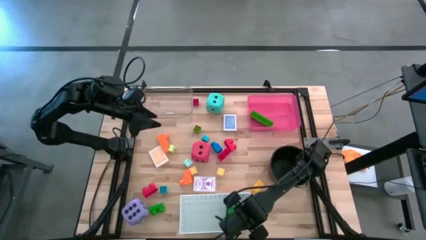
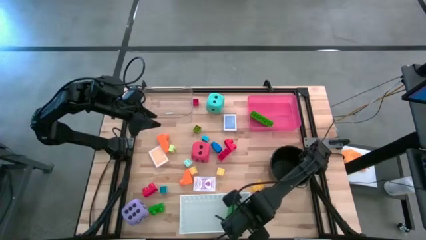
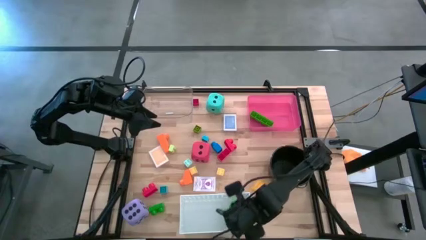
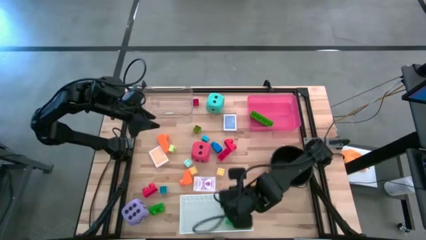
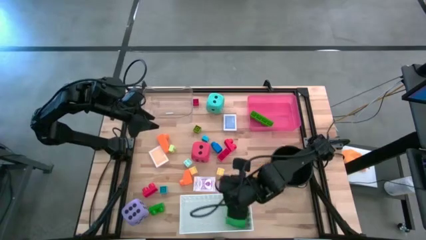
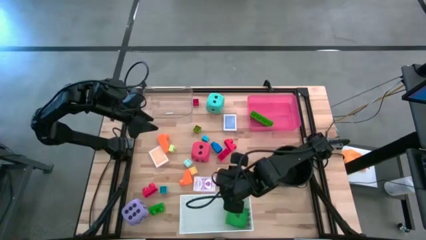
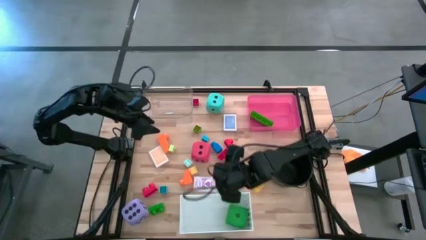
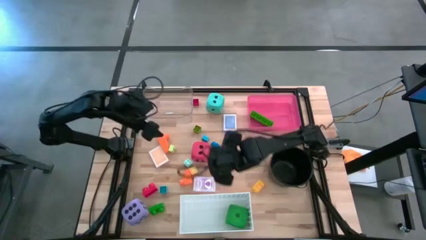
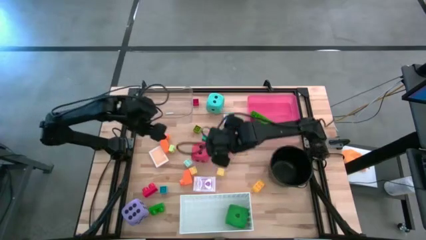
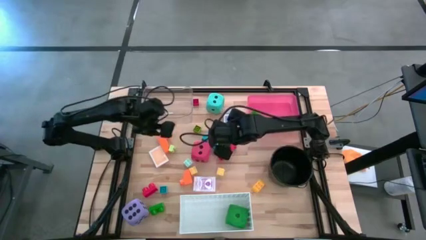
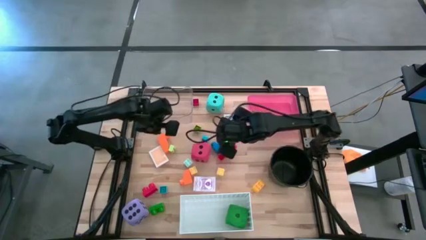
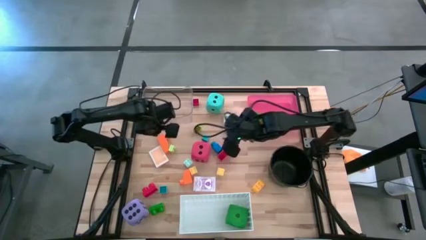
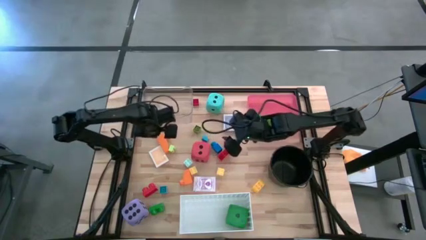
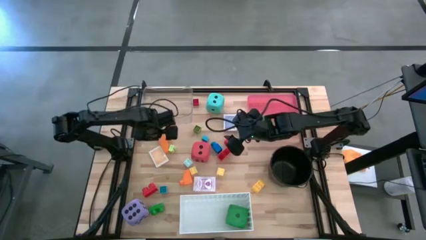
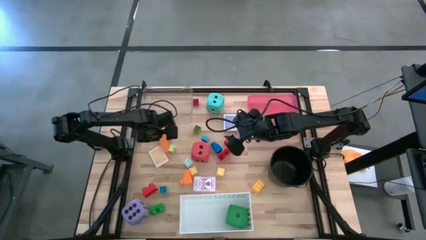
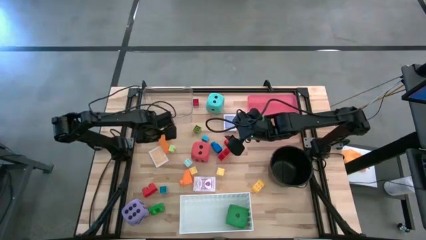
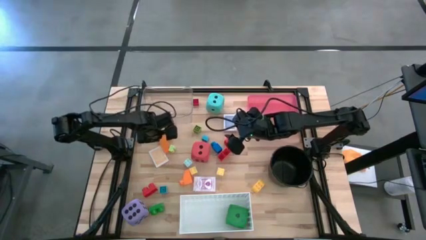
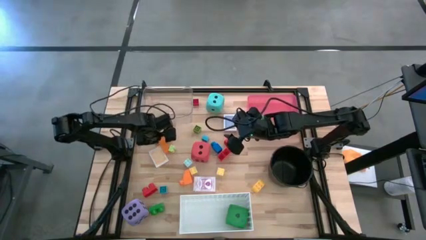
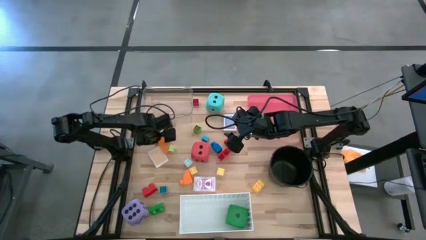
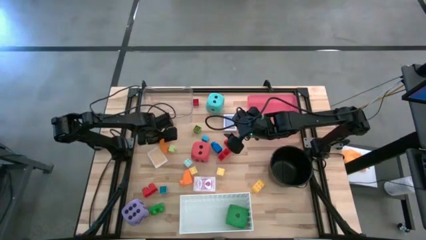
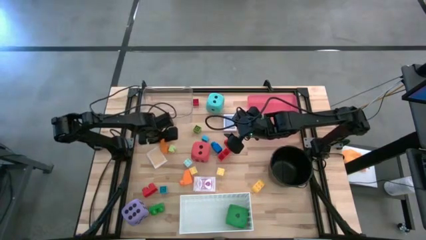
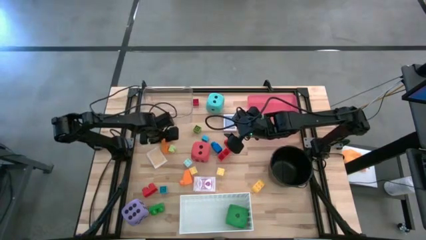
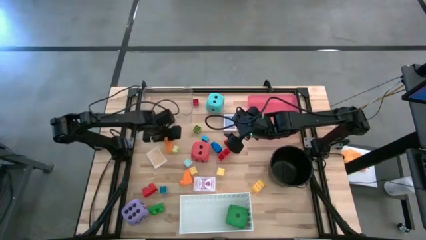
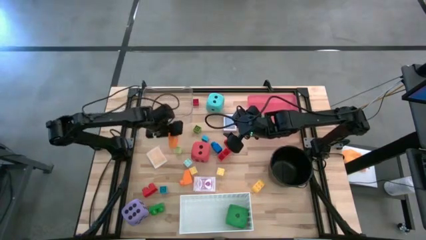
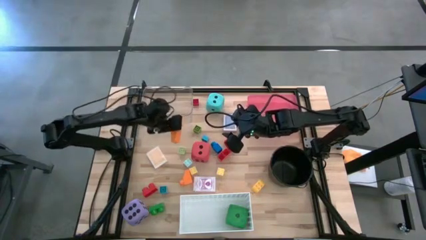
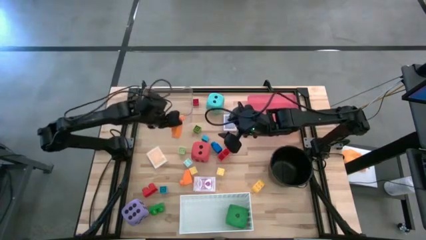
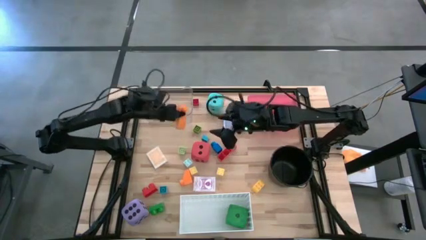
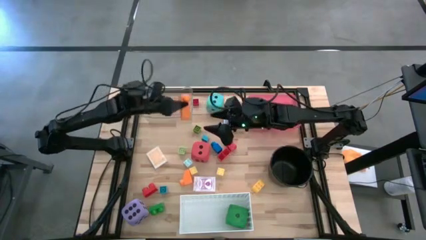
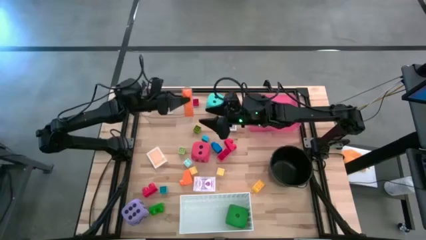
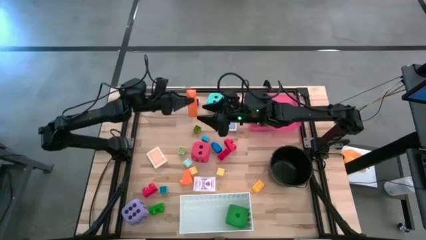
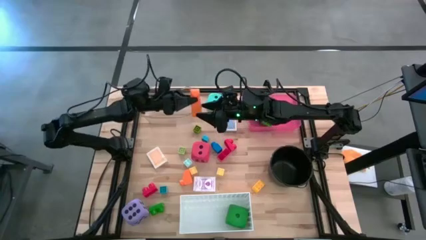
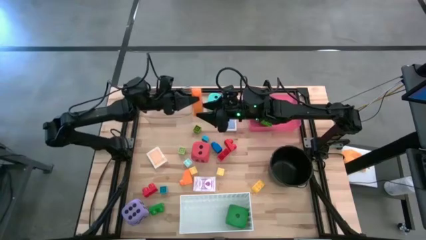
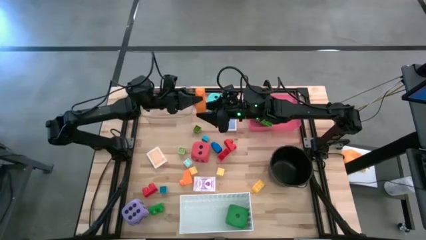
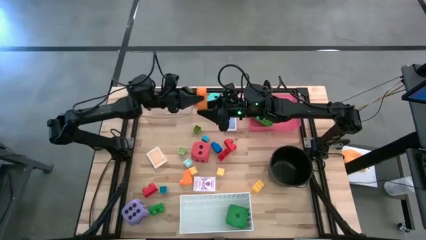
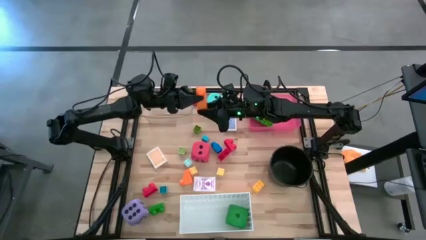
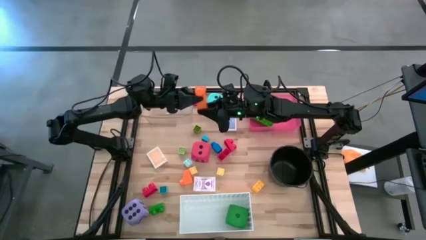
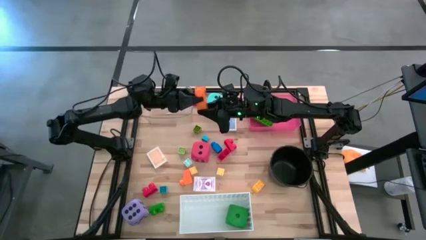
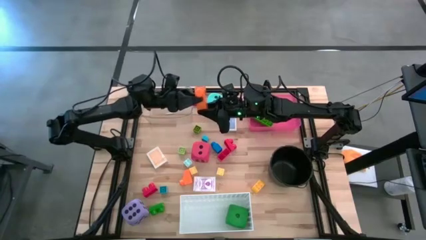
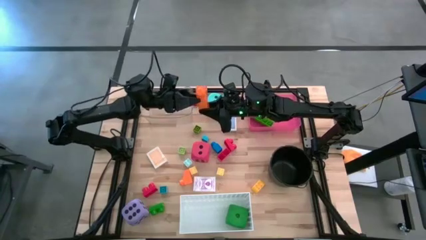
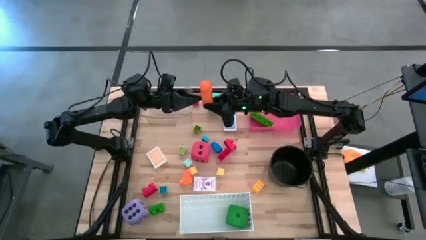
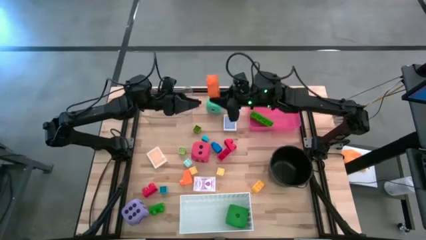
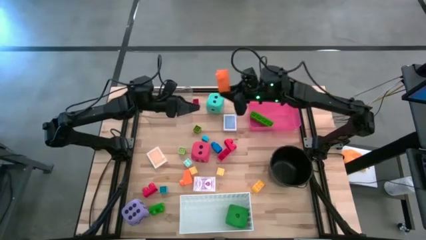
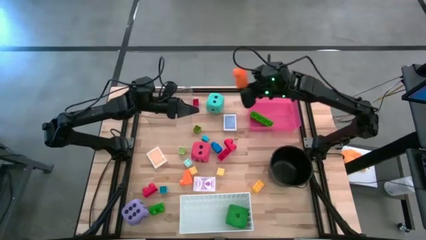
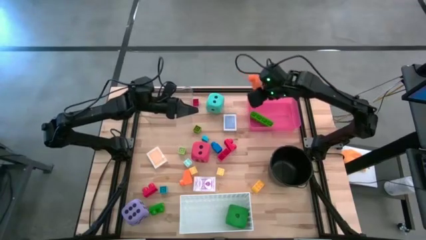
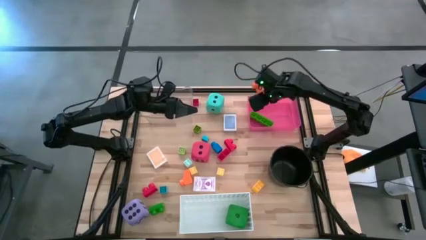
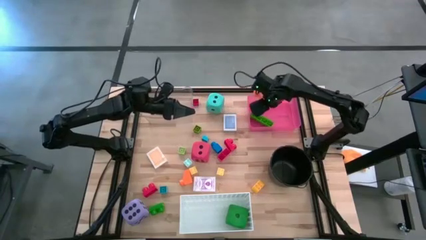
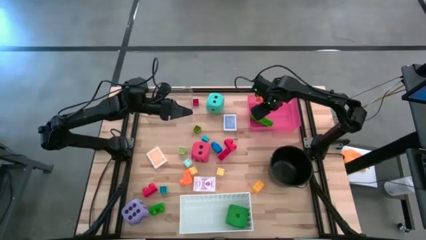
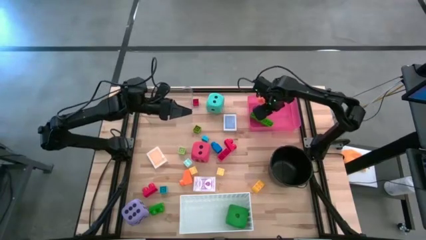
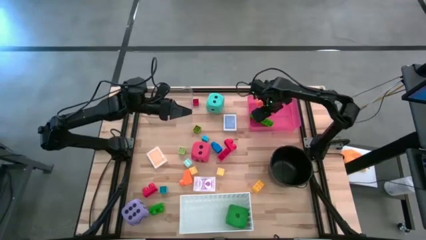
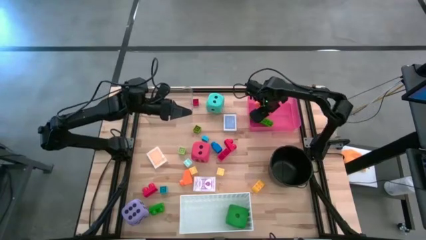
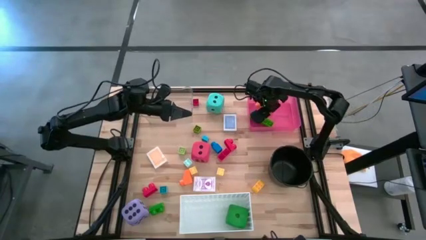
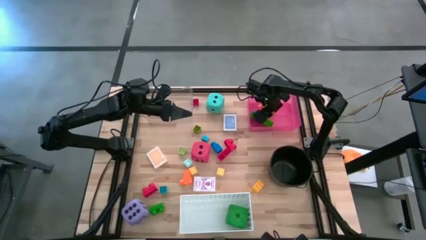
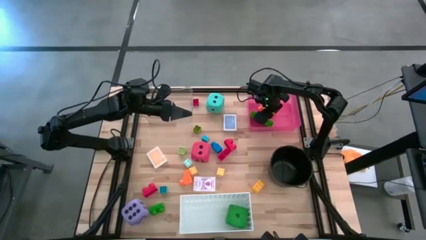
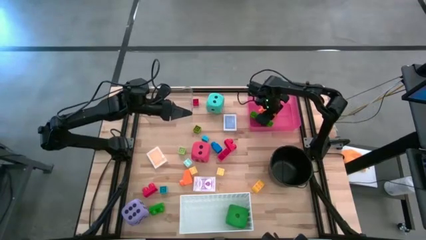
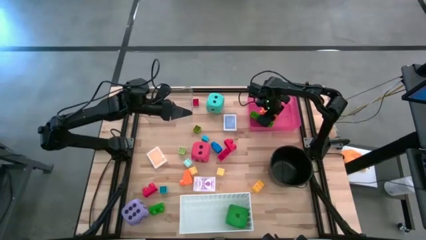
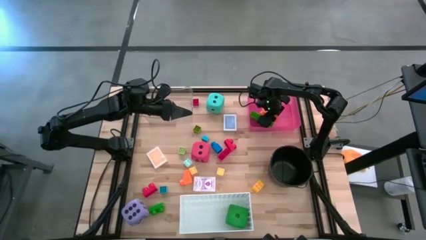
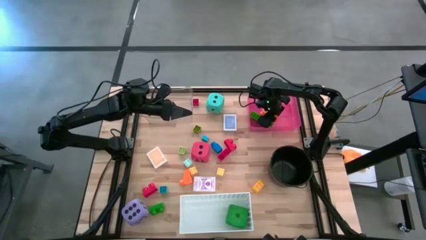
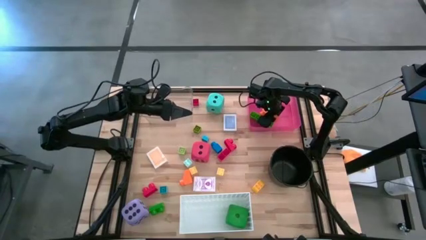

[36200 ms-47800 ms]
Task: Pick & Place Toys
Put the orange game piece into the red bin

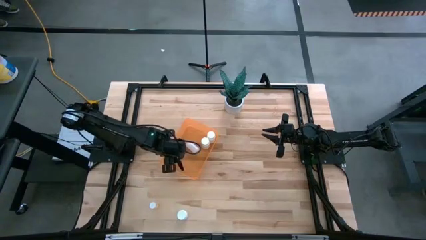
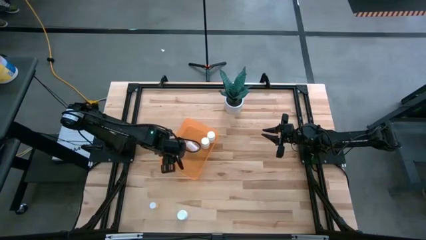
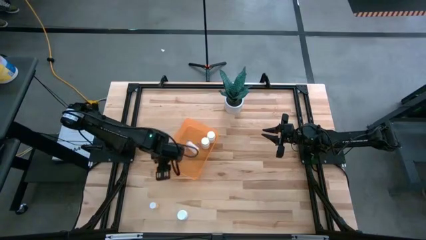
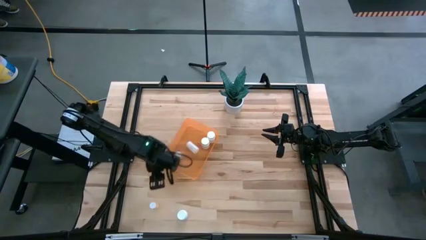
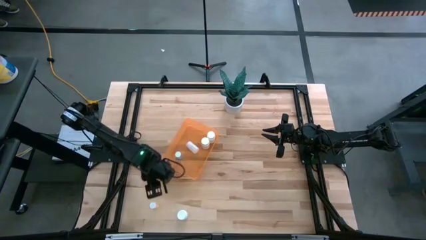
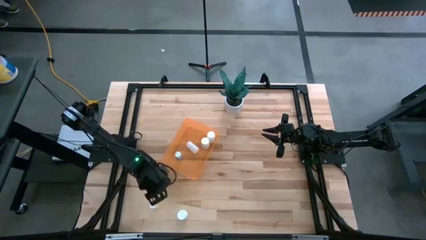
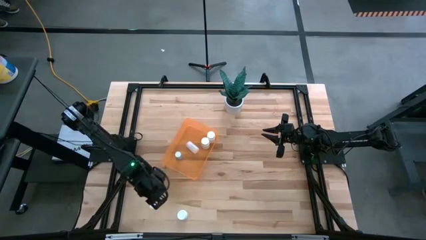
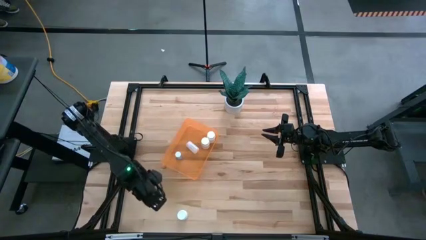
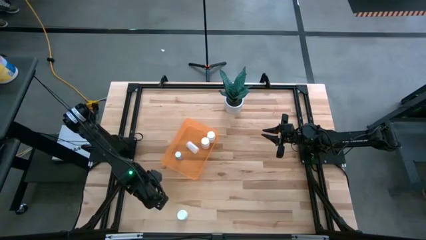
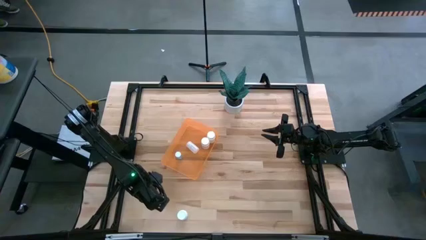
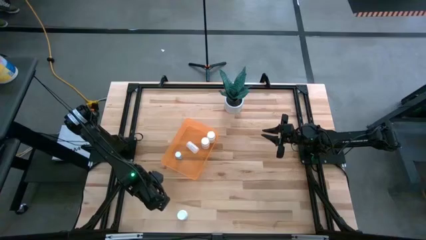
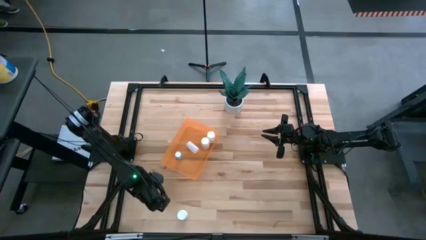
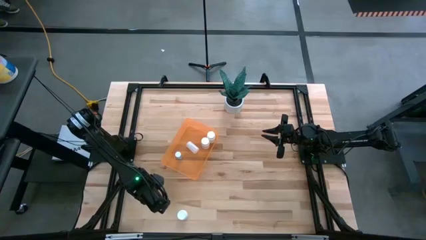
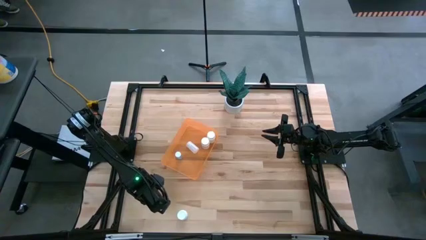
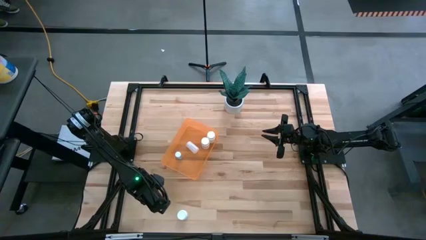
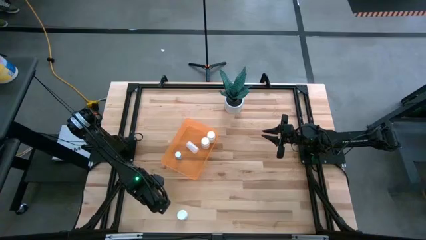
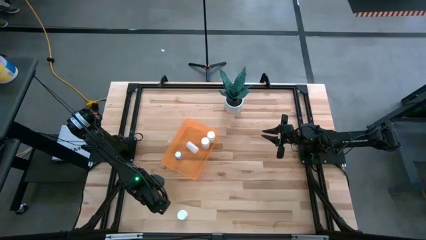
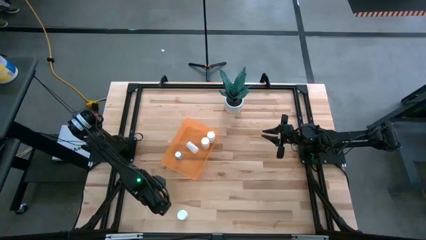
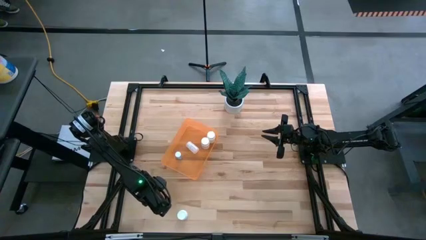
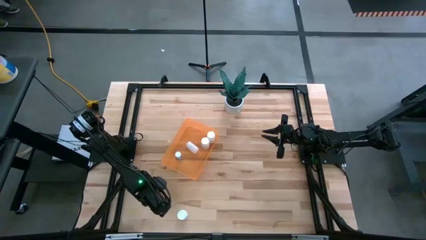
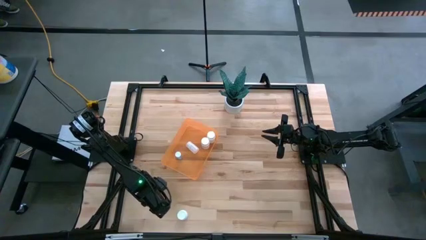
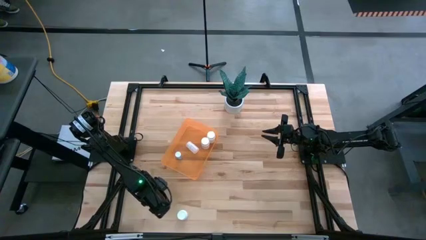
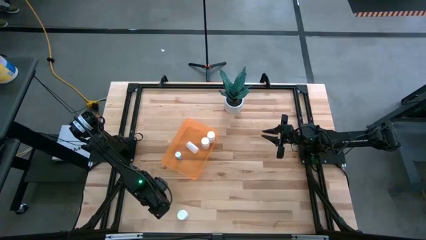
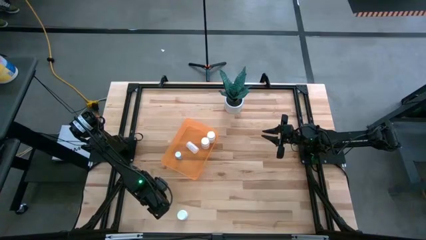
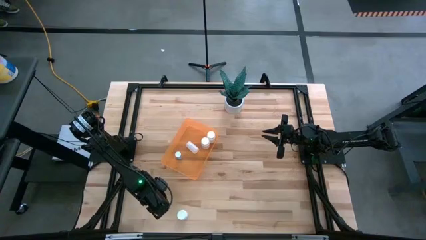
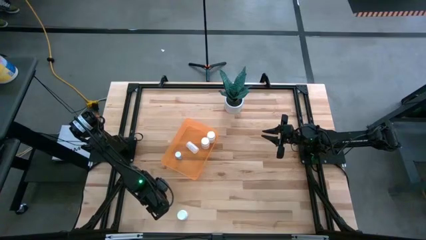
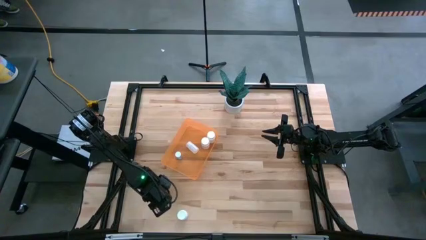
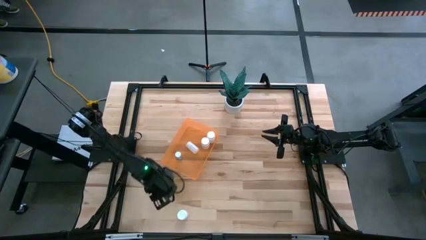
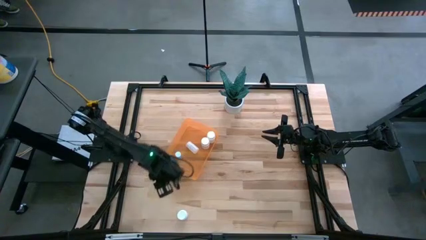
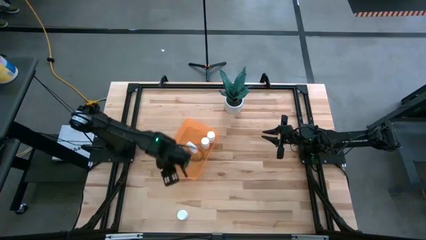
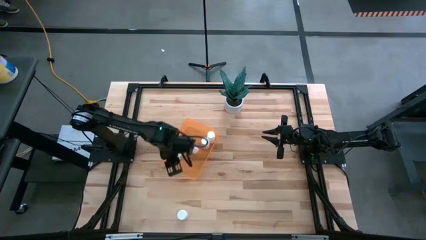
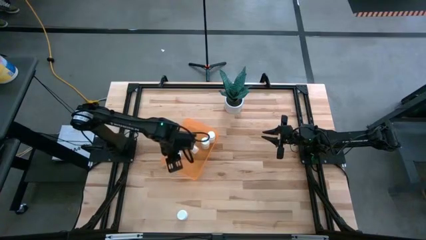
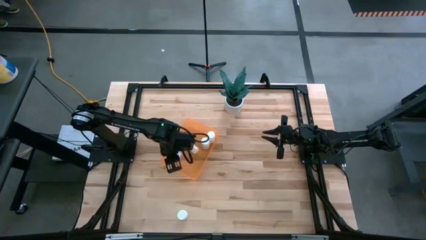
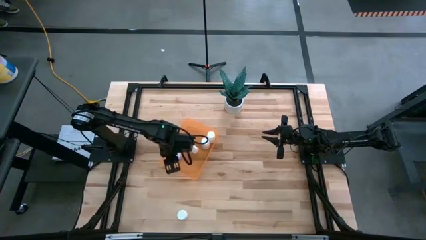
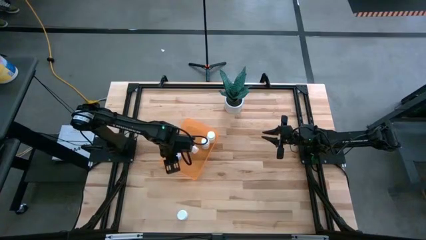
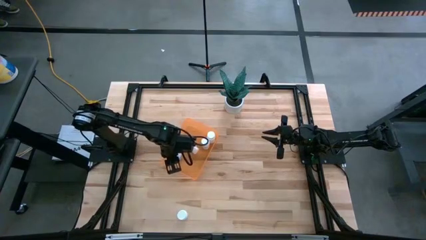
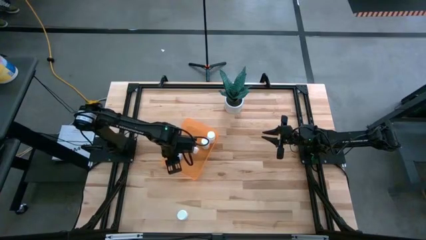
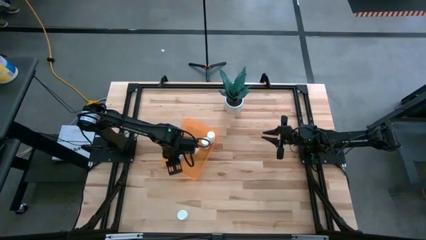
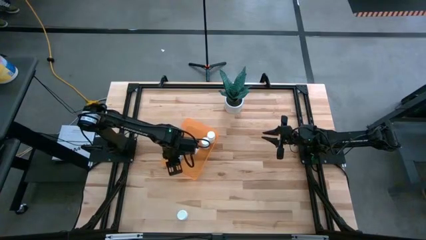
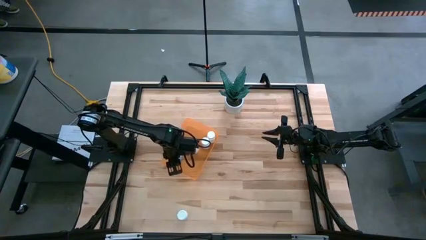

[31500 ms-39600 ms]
Task: Pick and place pill bottles into a basket
Put the yellow pill bottle into the orange bin
